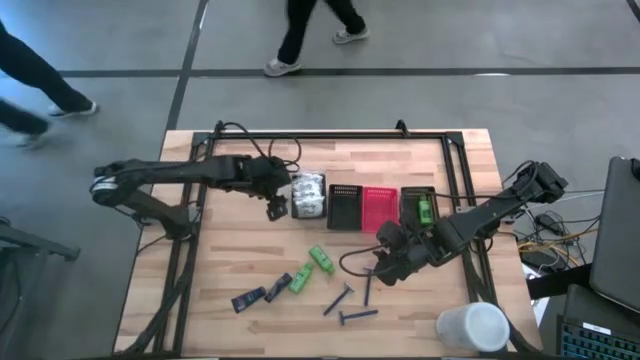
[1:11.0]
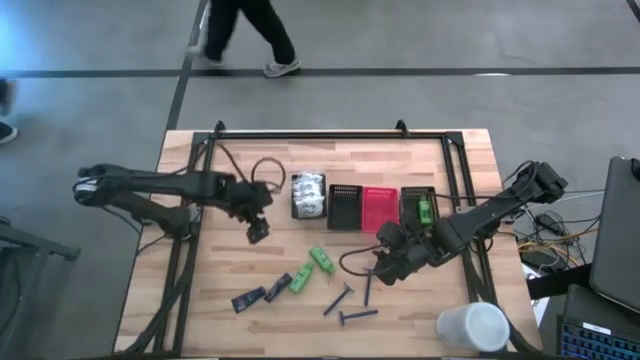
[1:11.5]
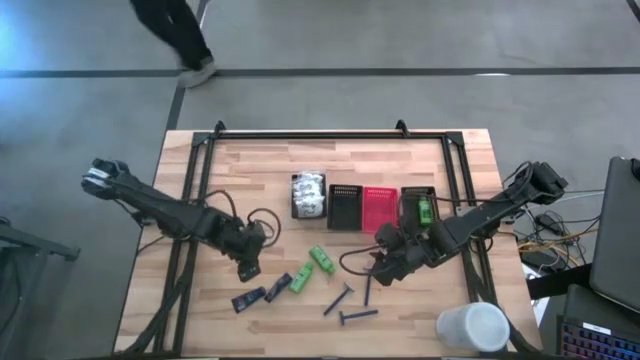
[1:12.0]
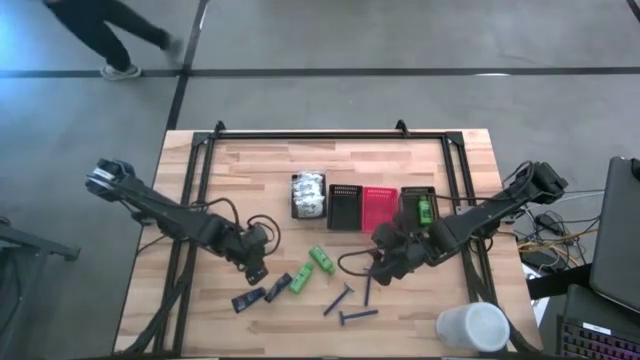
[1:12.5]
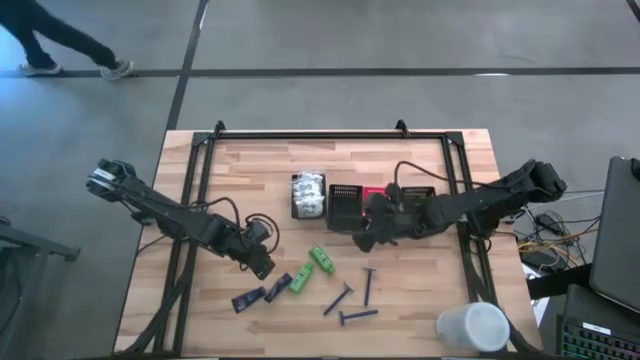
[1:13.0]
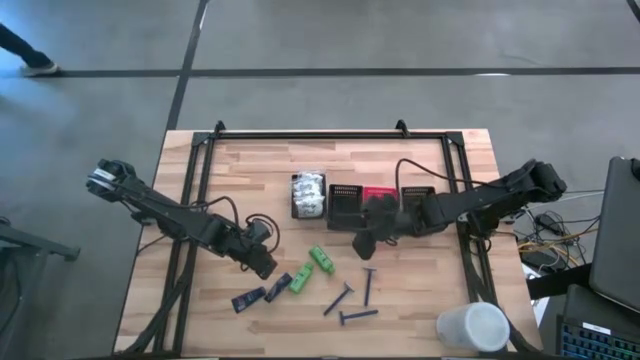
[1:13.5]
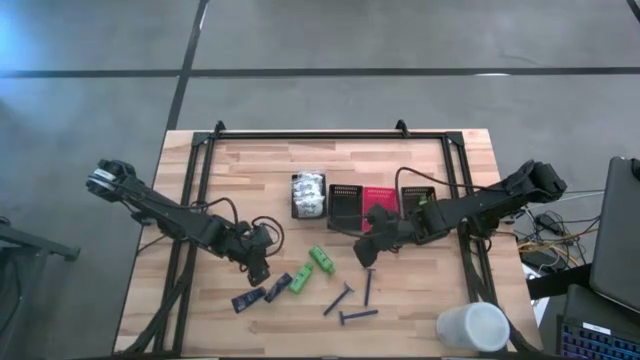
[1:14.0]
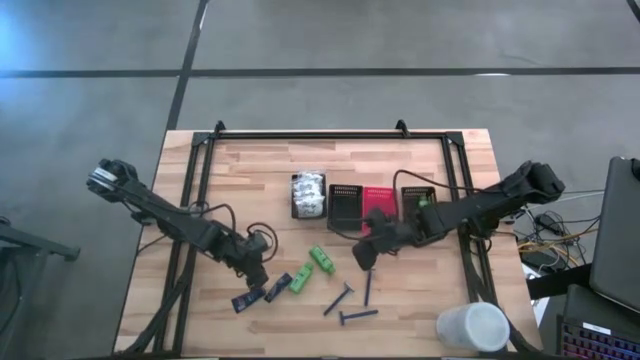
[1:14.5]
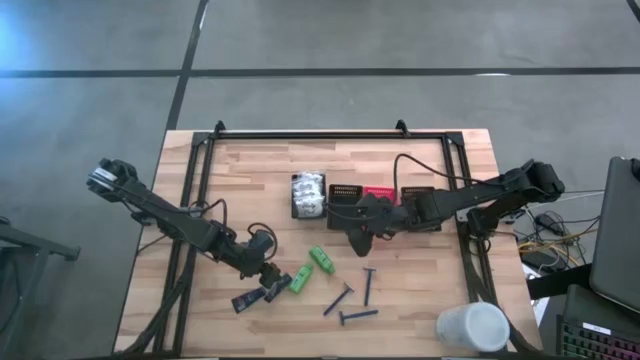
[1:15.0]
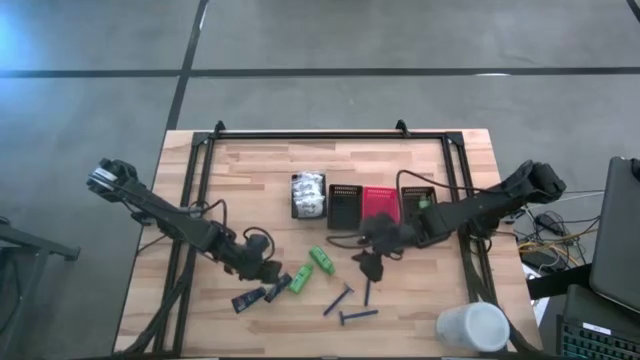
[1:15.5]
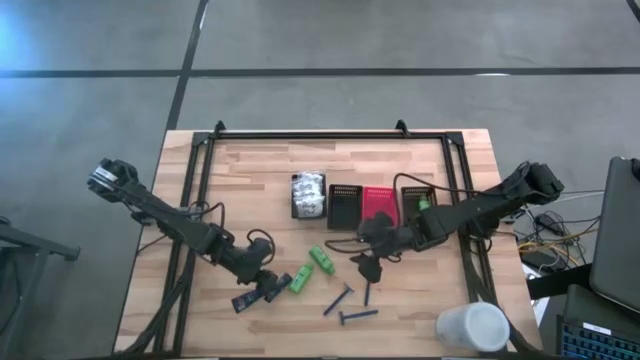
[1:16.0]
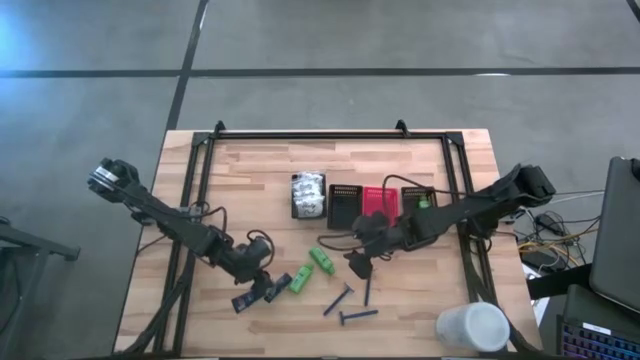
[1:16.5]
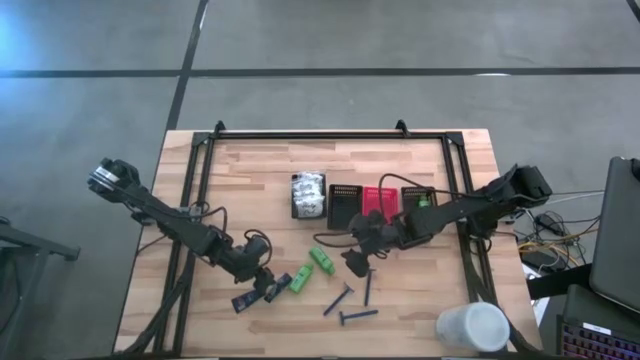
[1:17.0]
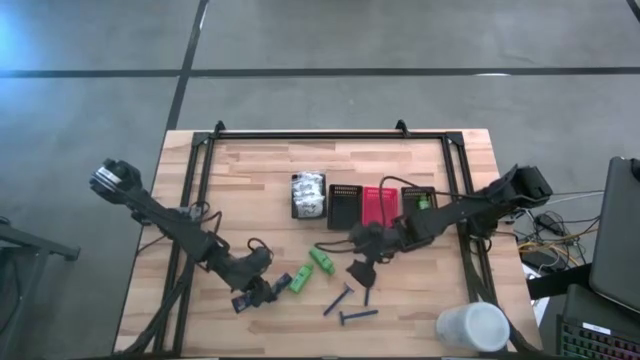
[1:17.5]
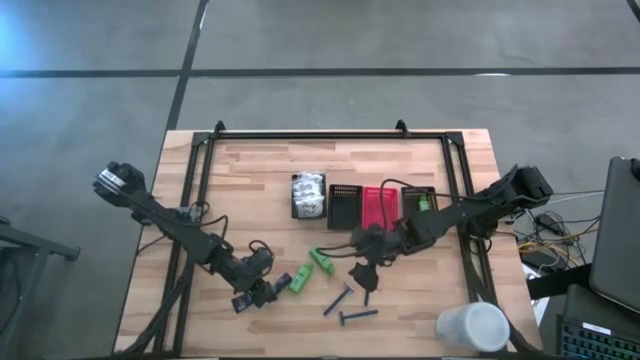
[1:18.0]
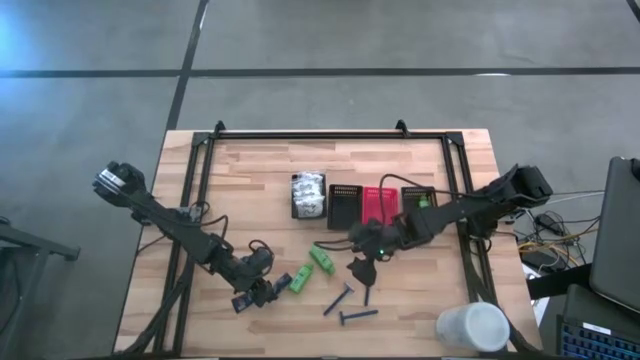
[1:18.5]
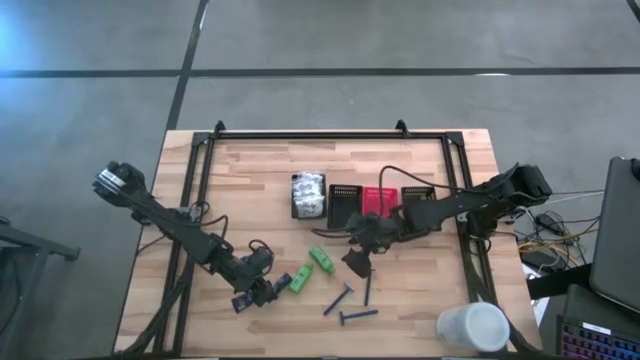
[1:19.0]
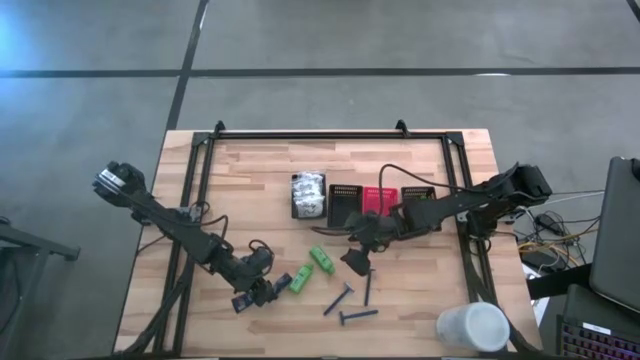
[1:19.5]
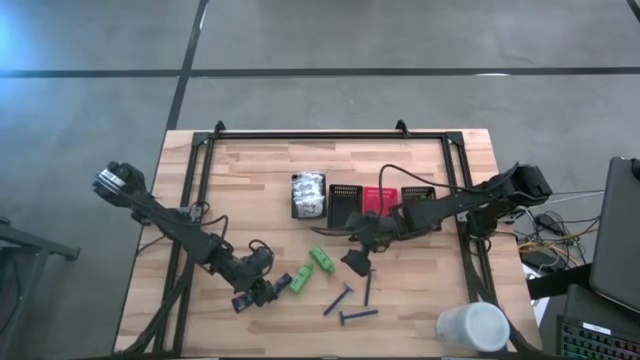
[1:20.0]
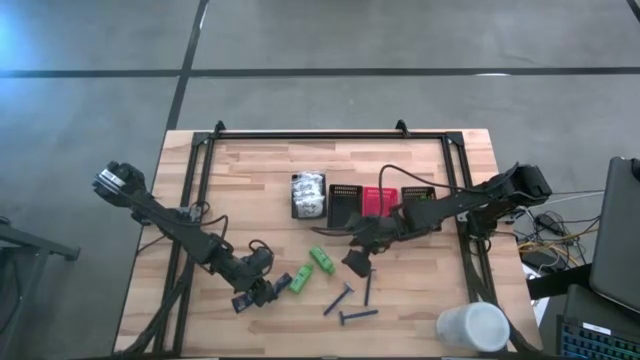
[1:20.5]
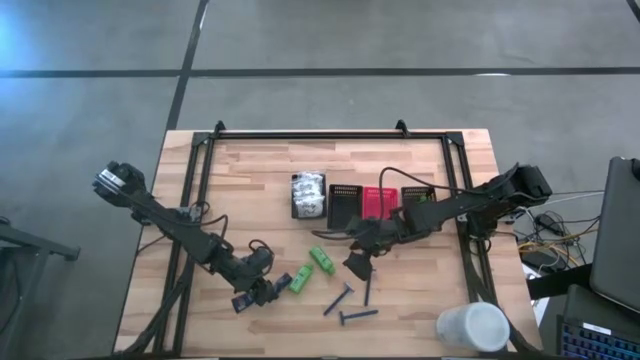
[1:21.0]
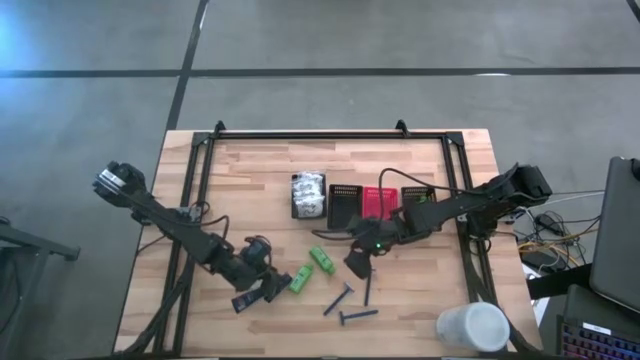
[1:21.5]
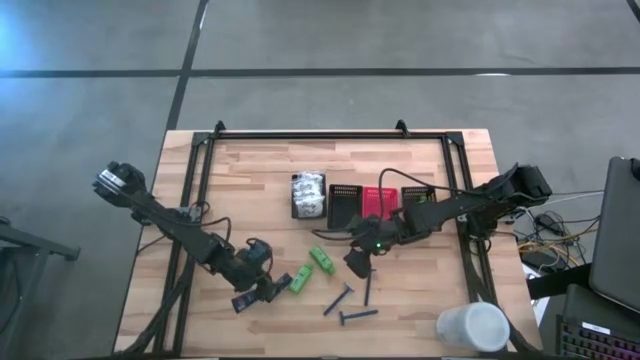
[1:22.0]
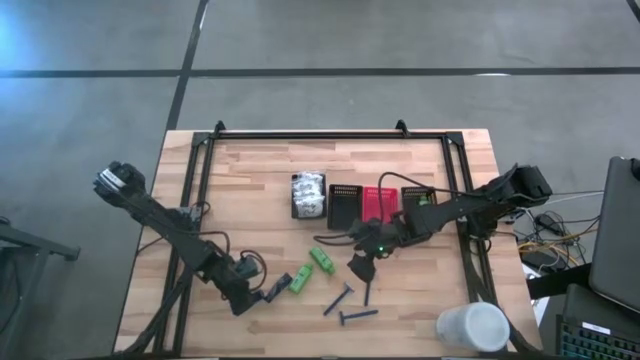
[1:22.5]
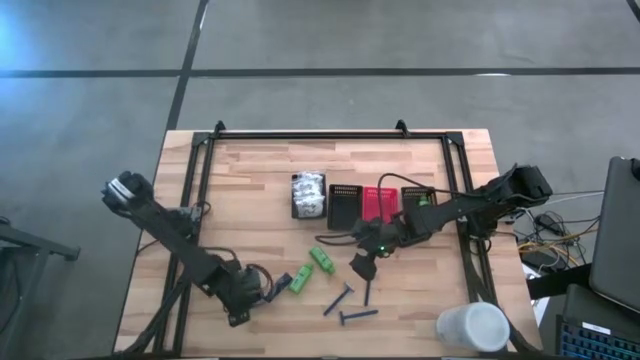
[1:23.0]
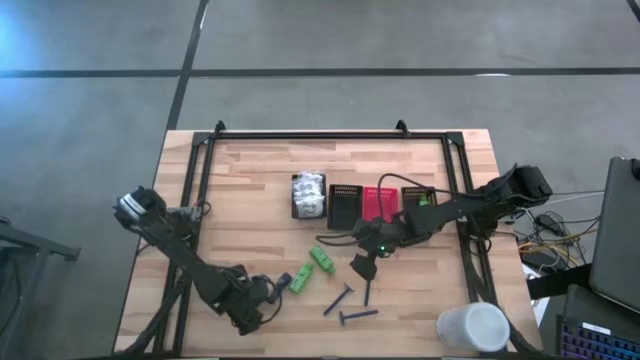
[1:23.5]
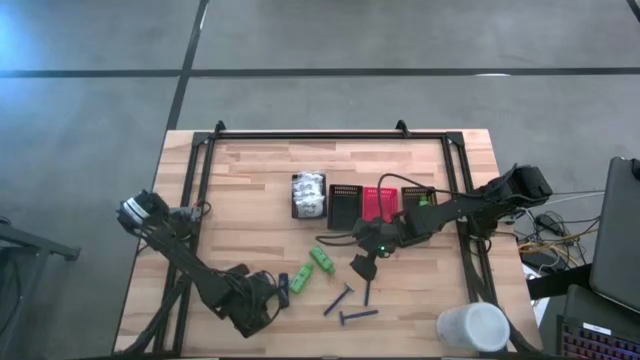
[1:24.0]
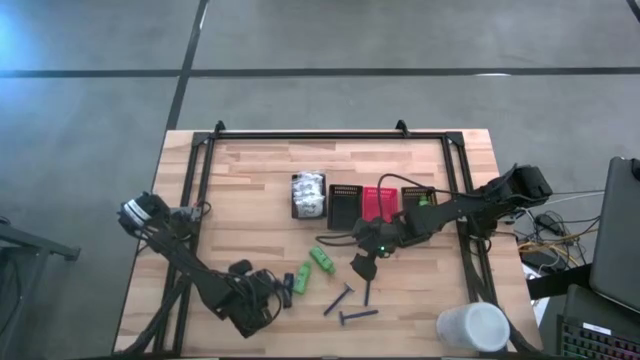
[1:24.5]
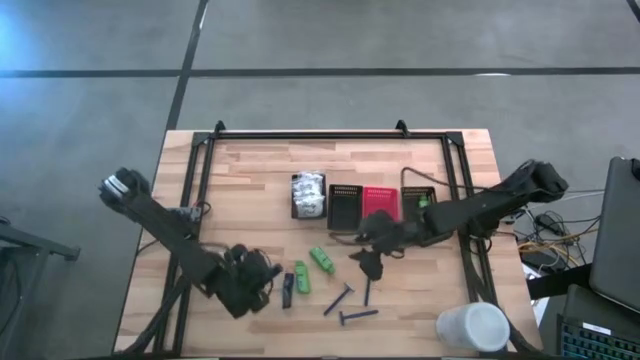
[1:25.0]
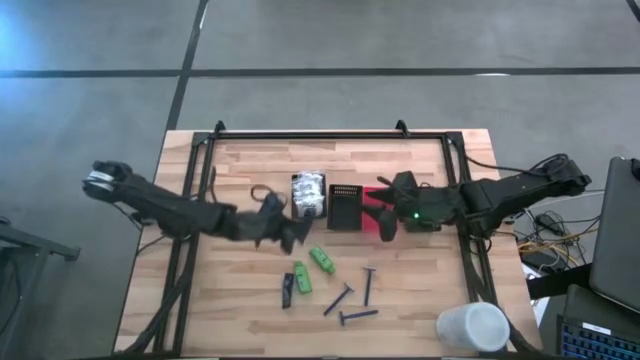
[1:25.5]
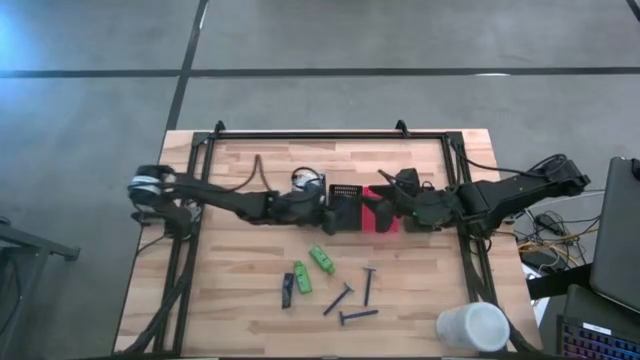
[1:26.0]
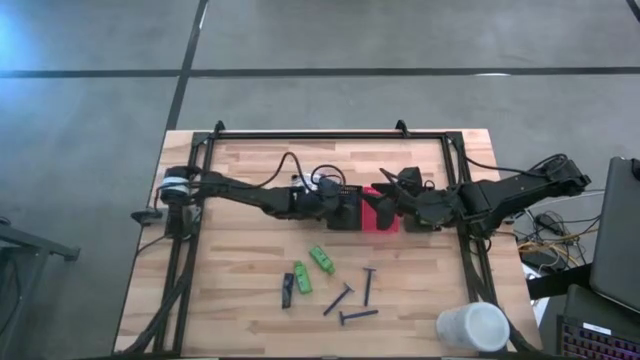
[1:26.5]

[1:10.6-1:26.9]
Task: Pick & Place Travel size toiletries
Put the blue shaving cream into the middle black bin

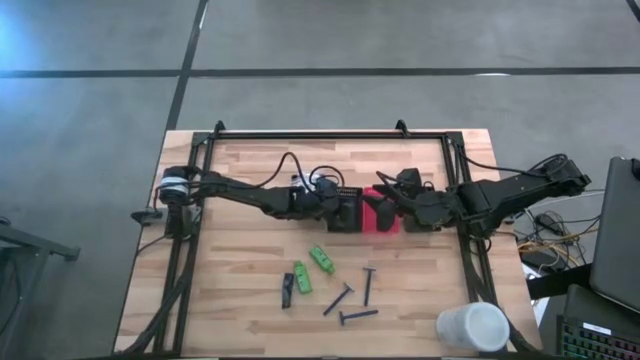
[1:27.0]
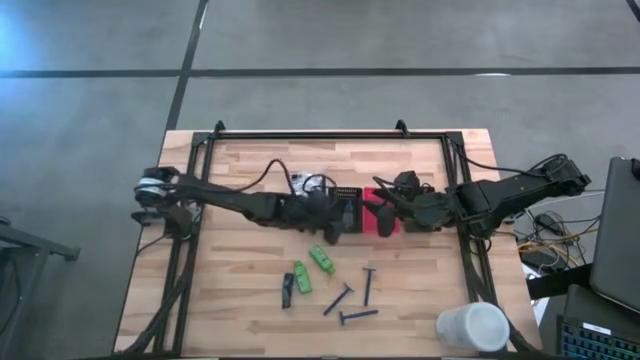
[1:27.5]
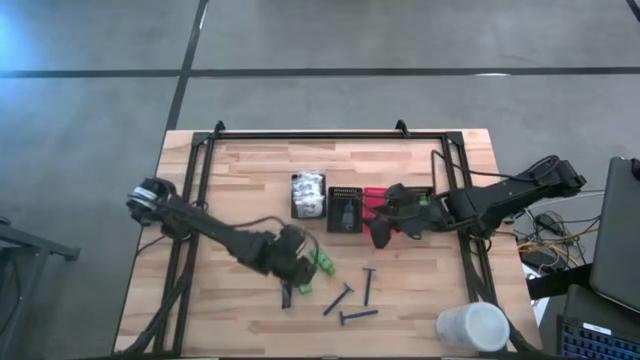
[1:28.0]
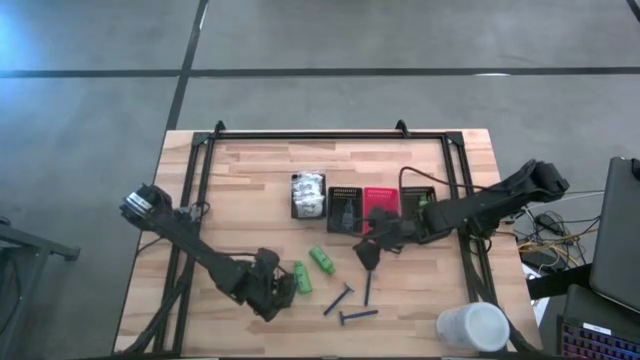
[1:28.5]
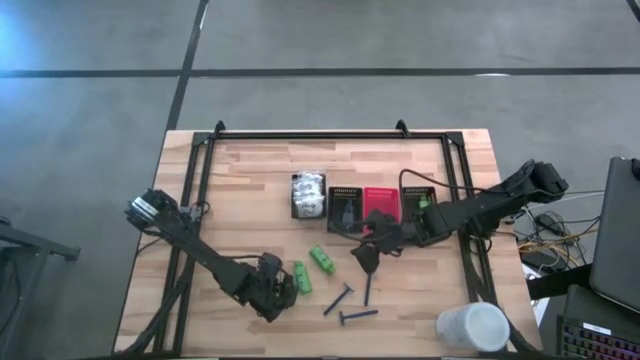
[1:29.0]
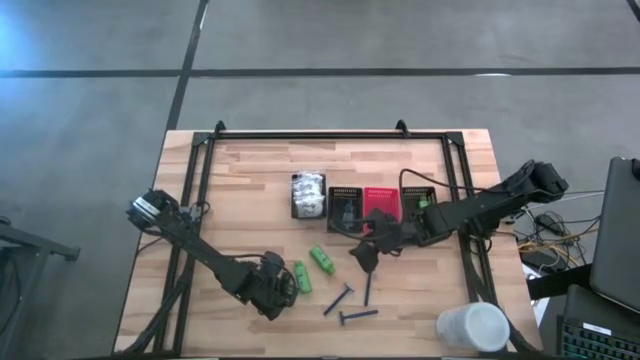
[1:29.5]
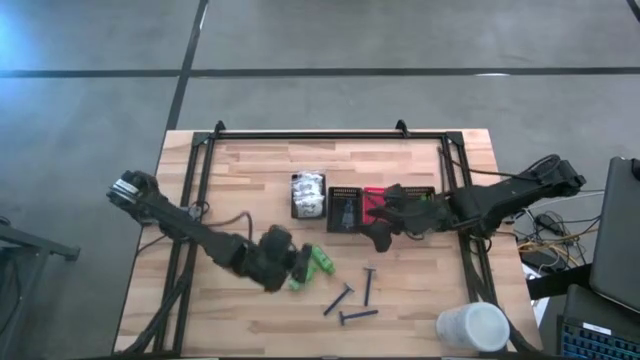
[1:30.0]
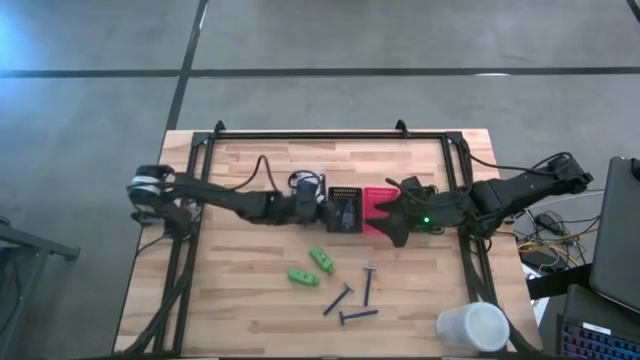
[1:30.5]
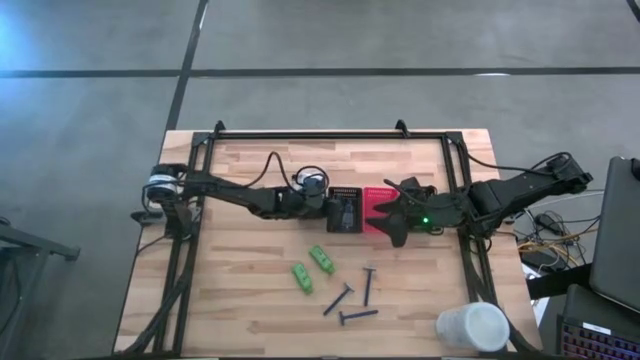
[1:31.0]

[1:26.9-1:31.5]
Put the blue shaving cream into the middle black bin

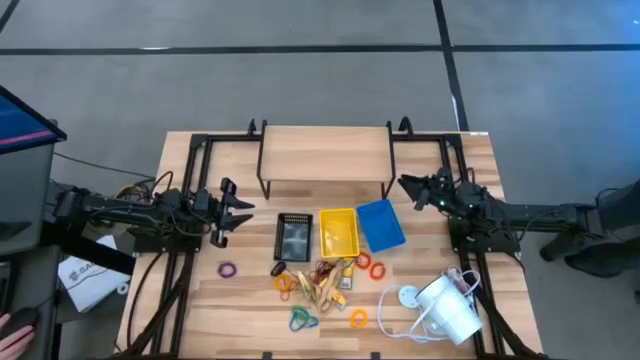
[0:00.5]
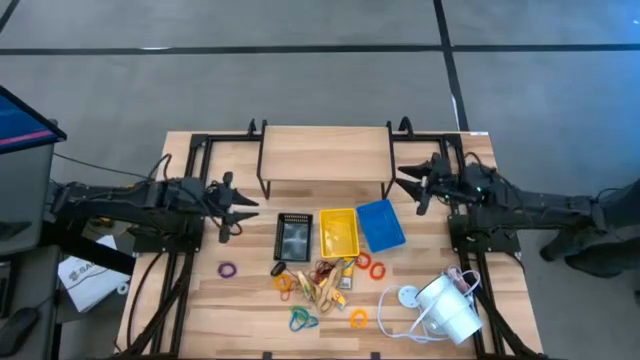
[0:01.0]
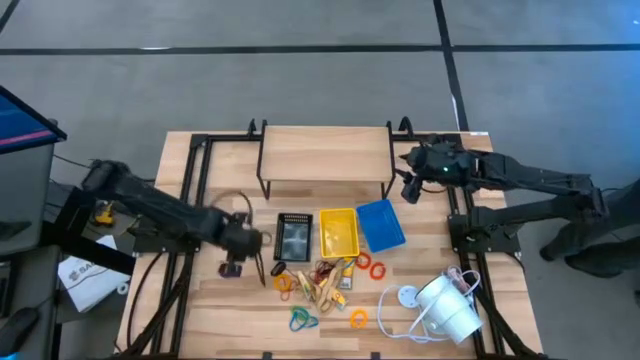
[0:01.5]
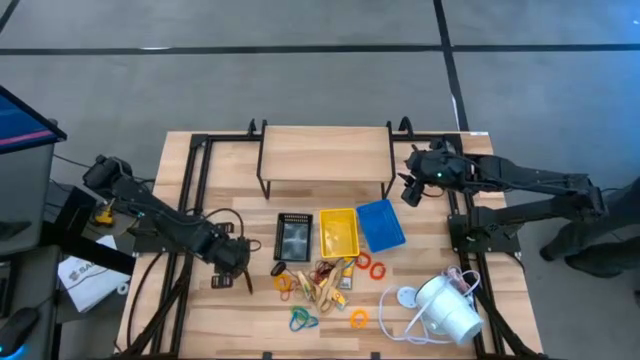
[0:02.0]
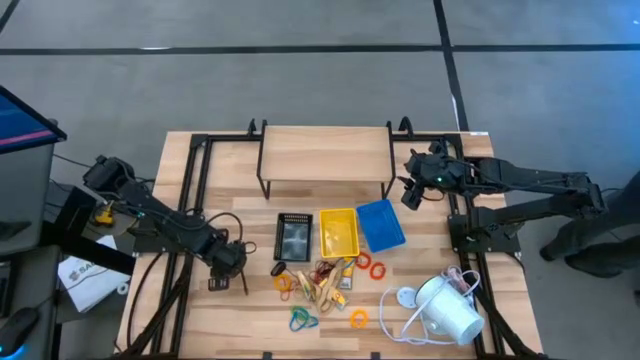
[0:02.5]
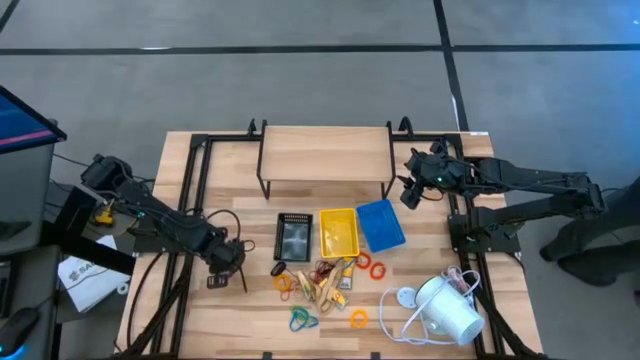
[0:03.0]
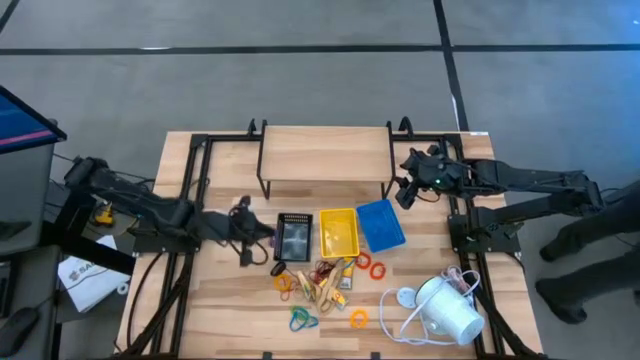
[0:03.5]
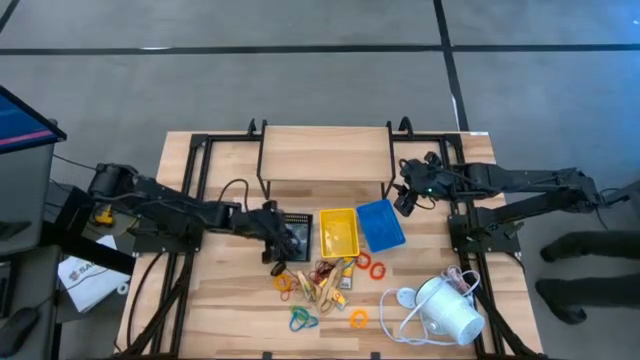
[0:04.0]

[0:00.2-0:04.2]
Task: Pick & Place Office Desk Supplies
Put the violet spring keychain into the black bin
